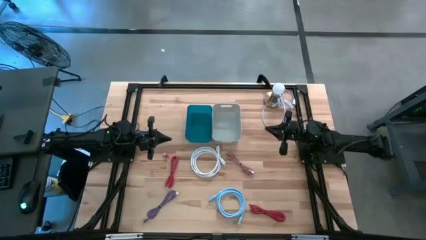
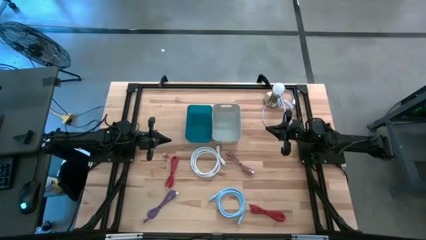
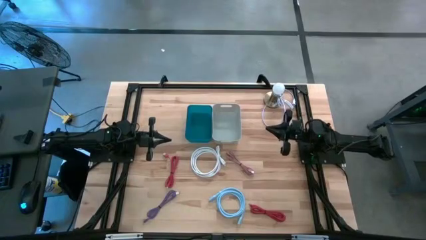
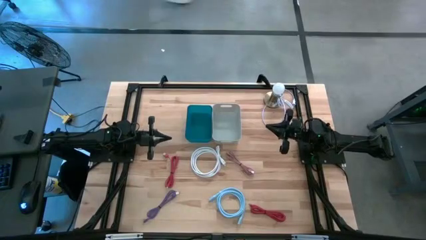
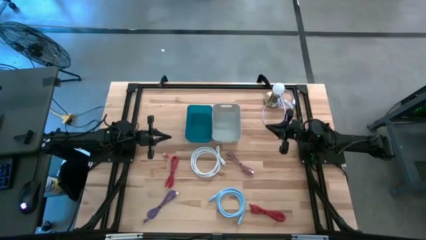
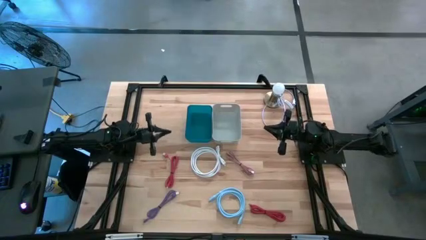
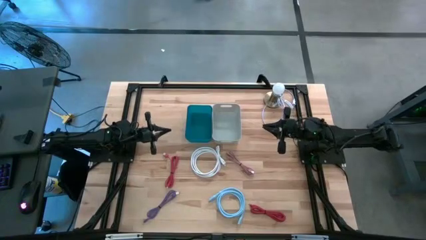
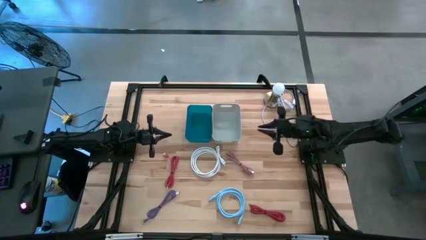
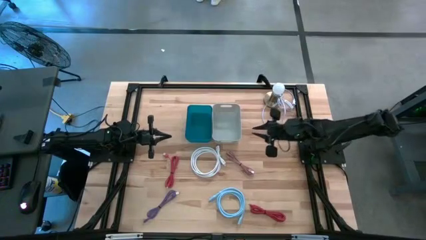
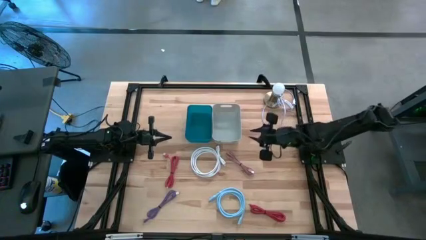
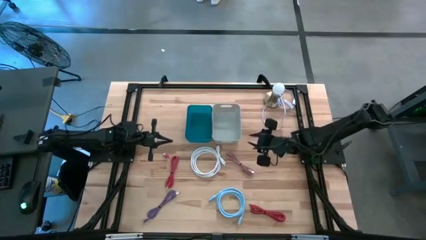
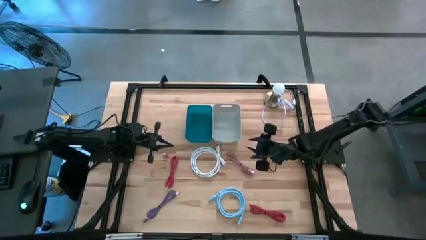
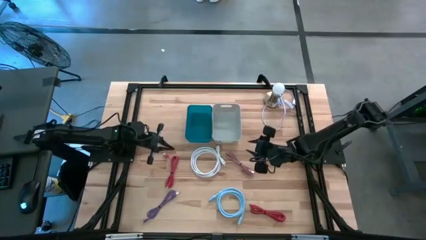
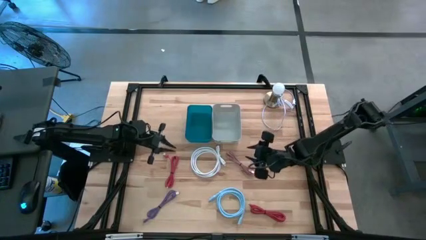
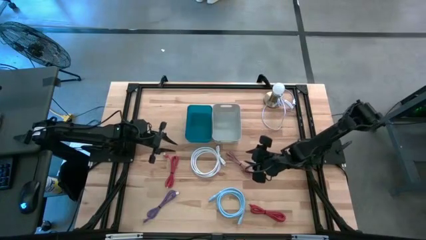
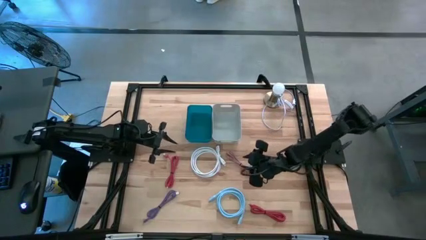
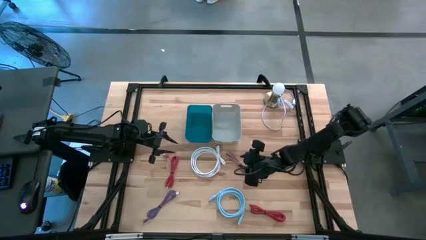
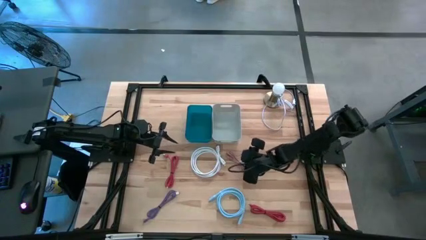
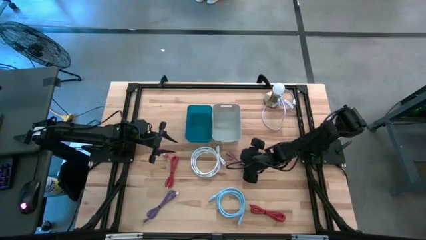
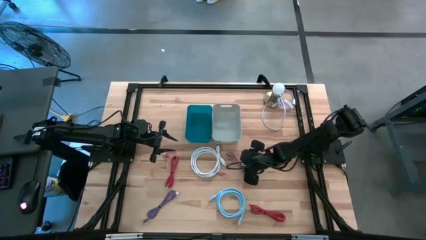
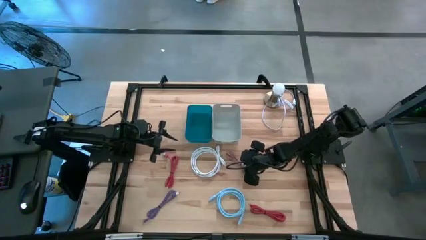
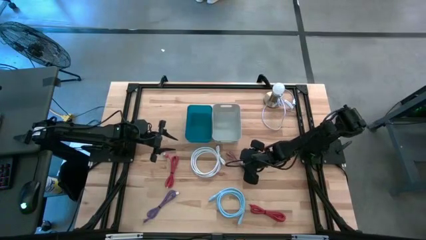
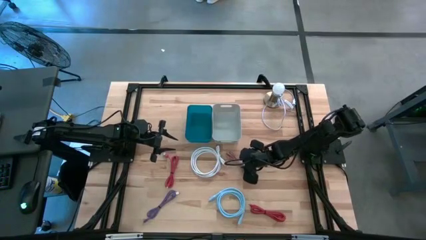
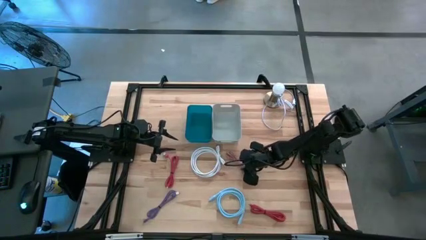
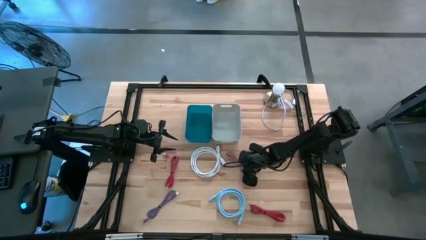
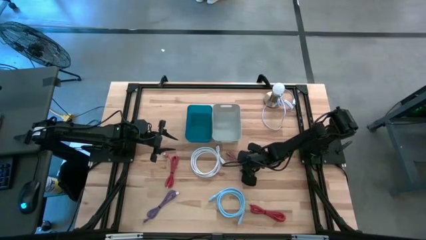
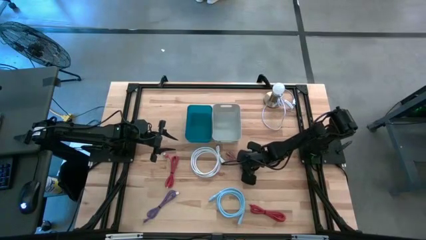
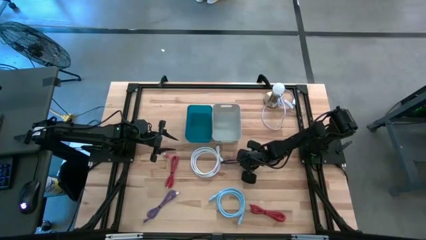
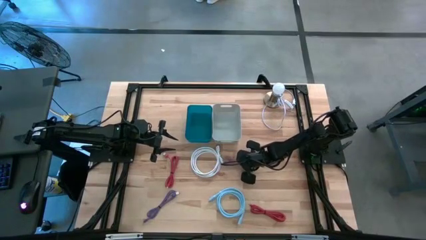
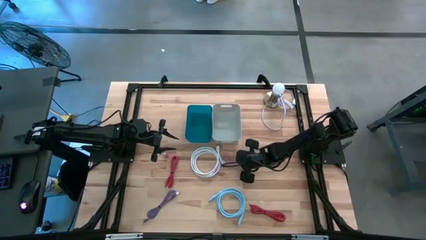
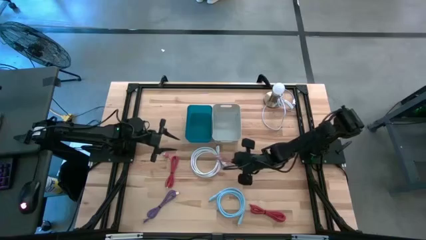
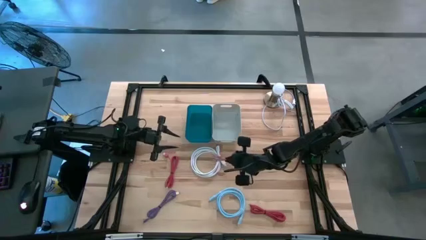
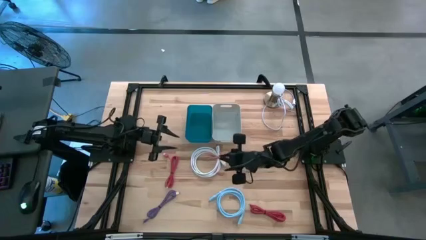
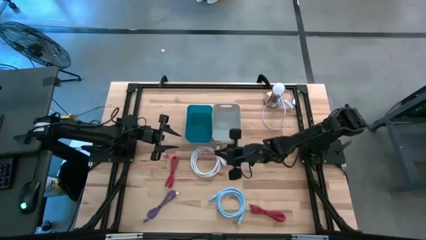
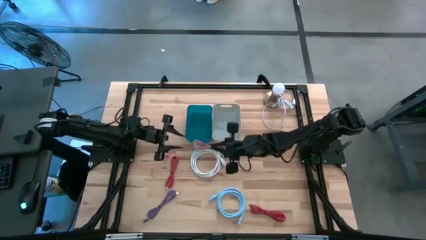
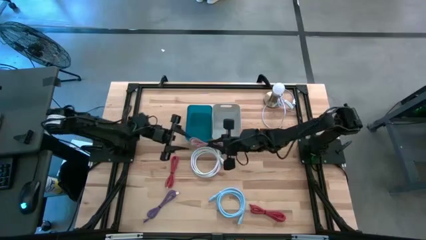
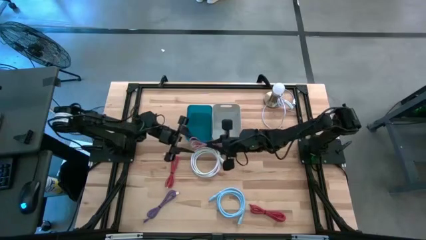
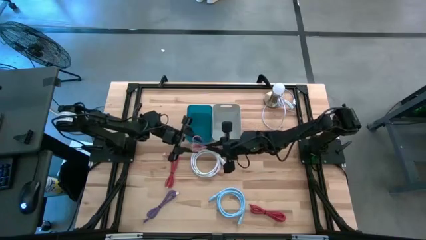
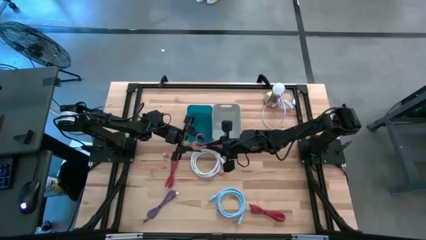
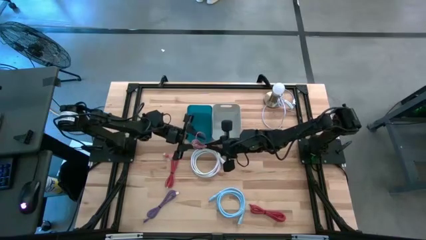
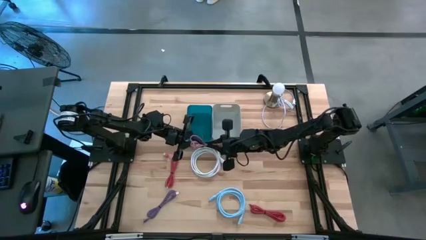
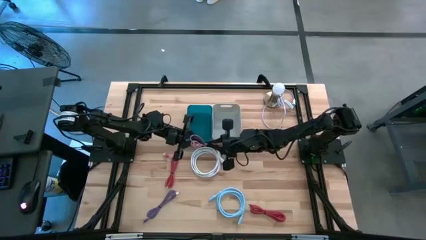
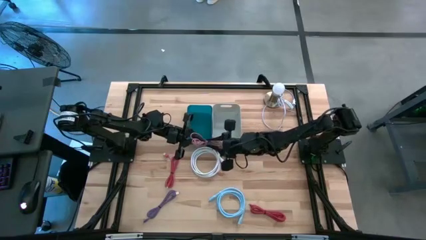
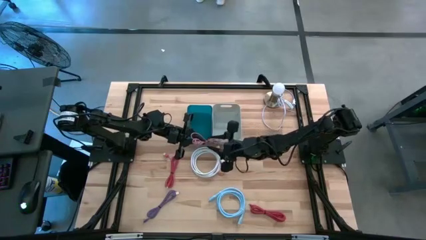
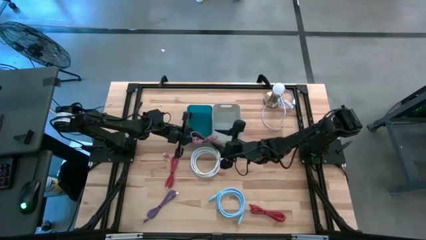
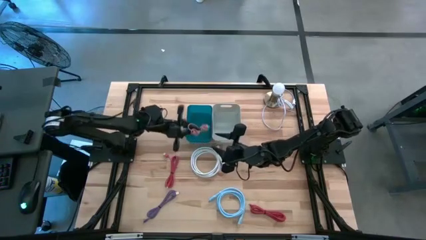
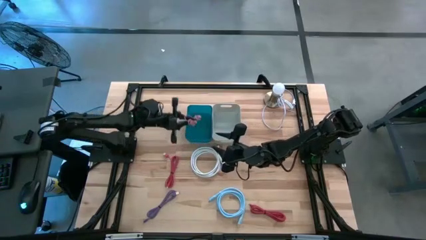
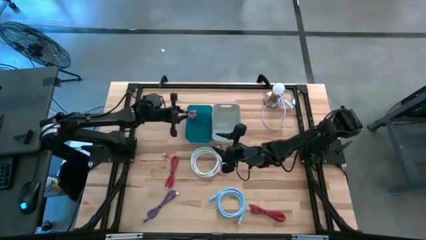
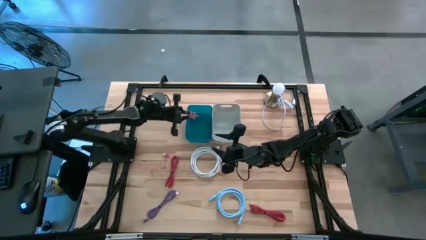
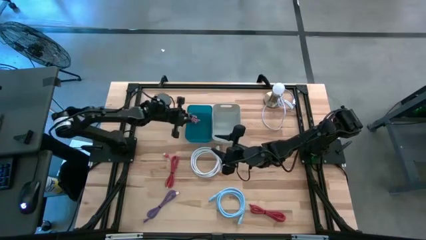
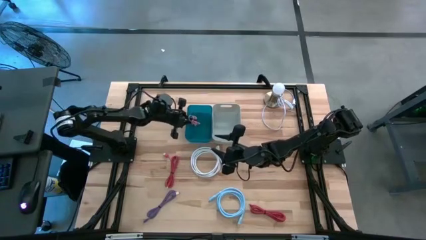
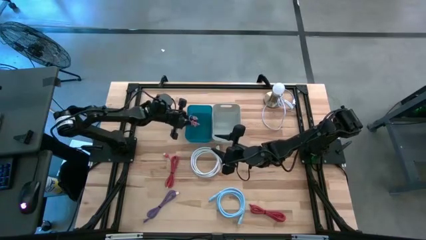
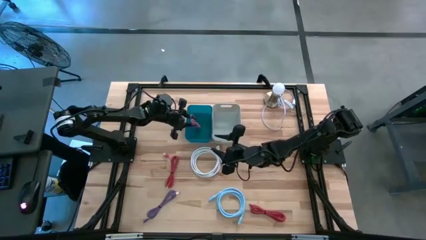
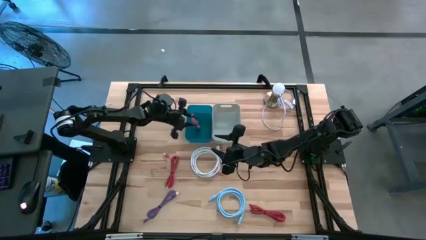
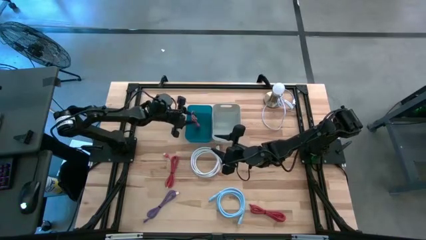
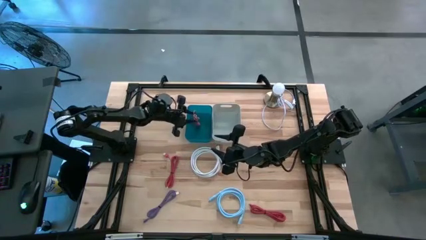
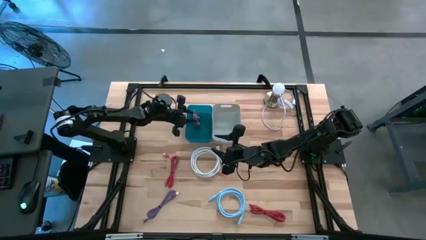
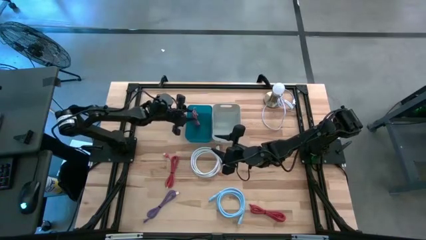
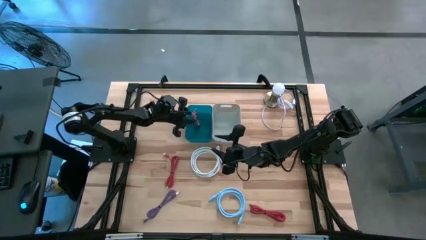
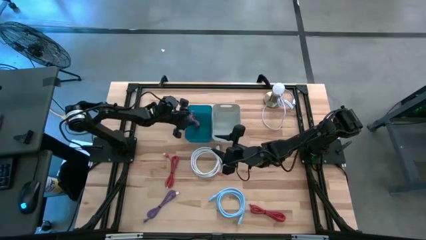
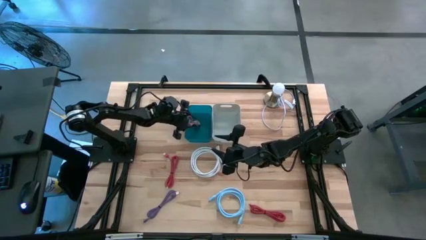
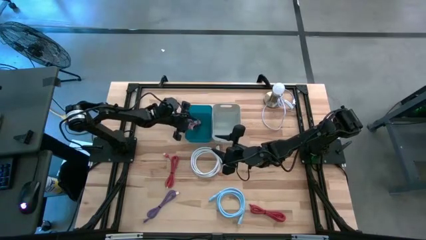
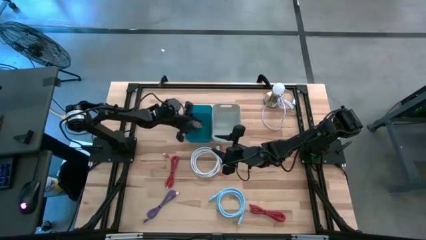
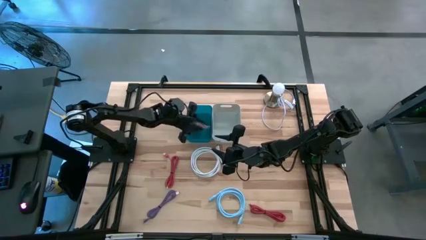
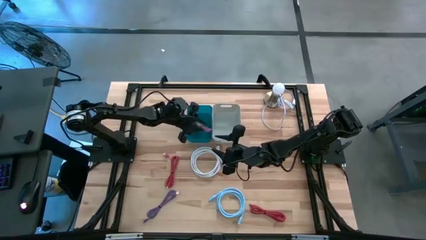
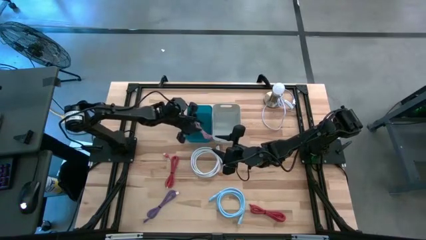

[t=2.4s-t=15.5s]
Task: Pick & Place USB Port
Put the pink charger cable into the blue bin
